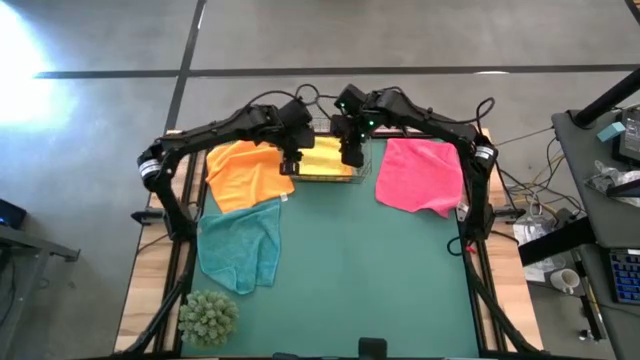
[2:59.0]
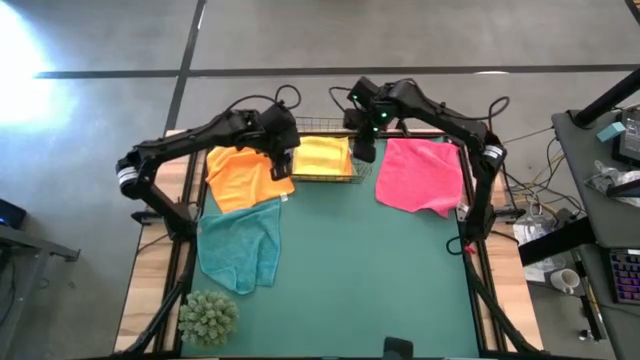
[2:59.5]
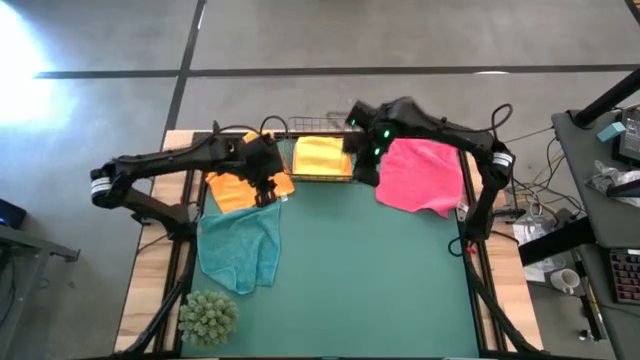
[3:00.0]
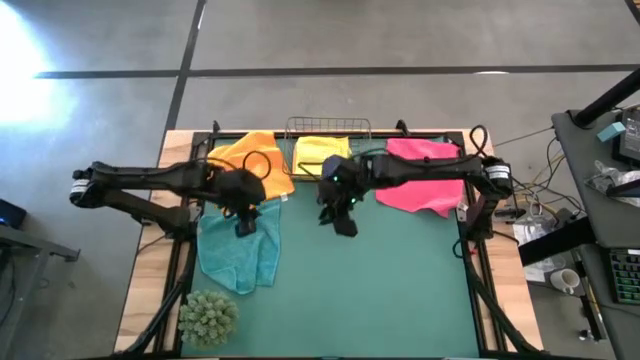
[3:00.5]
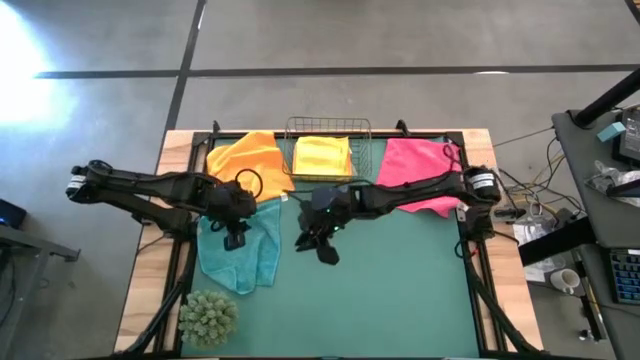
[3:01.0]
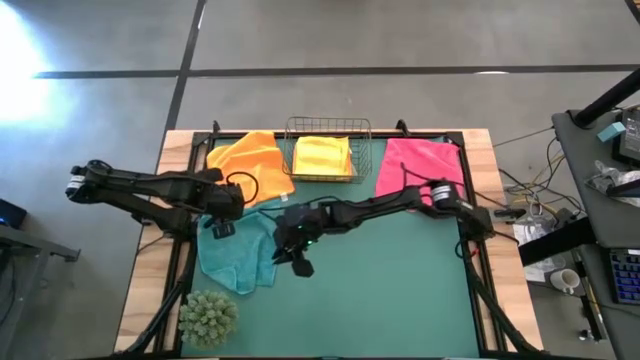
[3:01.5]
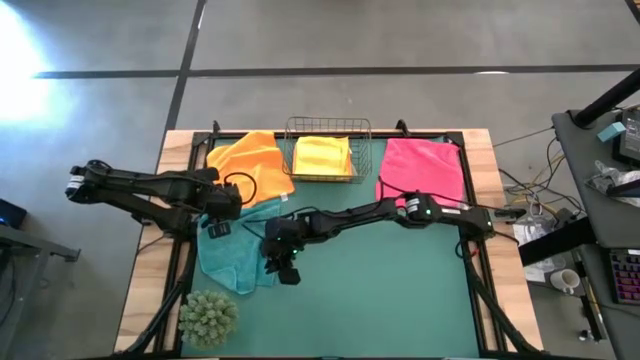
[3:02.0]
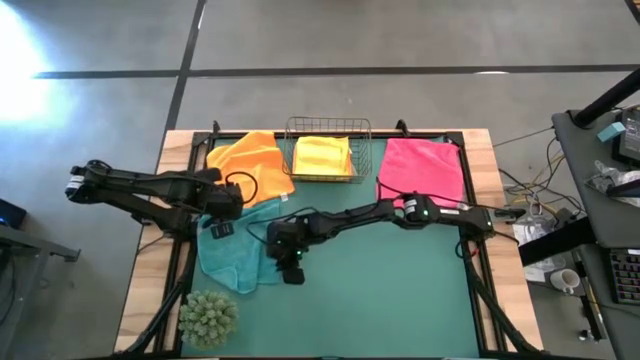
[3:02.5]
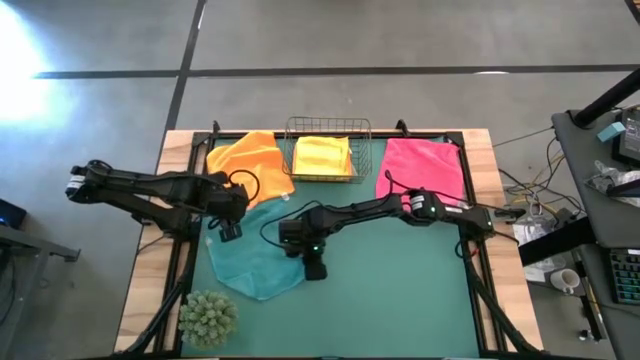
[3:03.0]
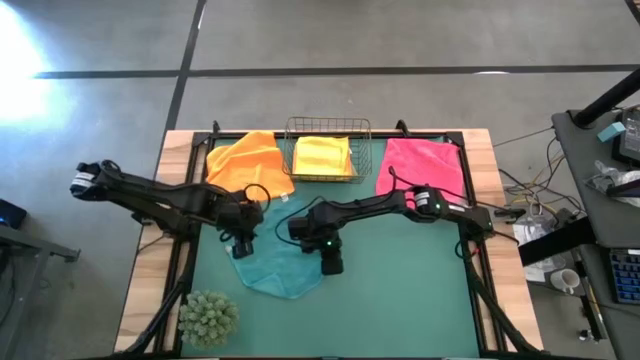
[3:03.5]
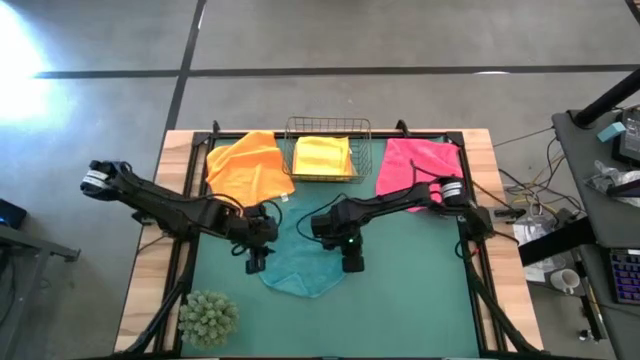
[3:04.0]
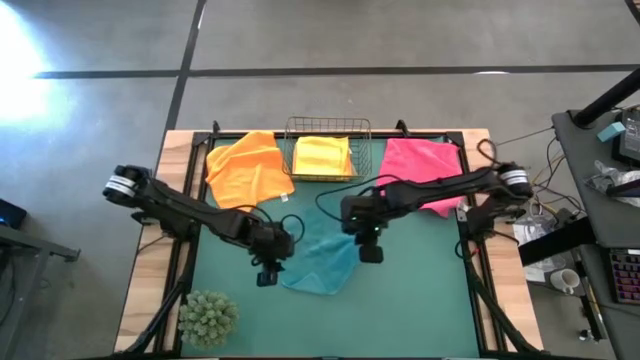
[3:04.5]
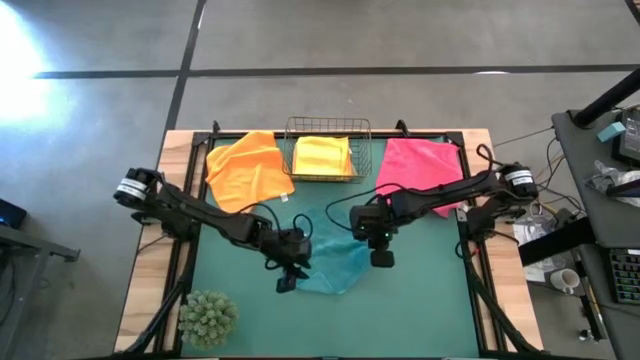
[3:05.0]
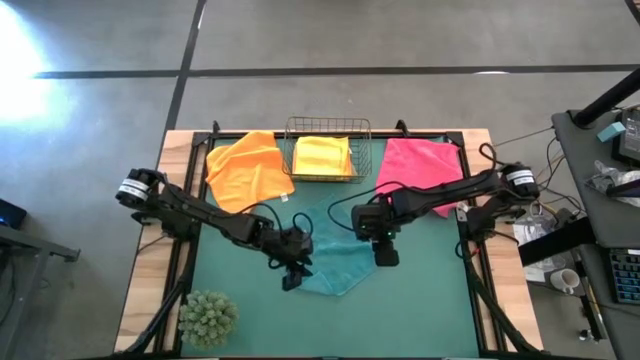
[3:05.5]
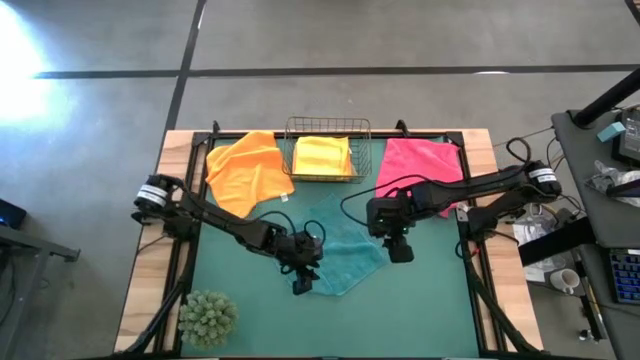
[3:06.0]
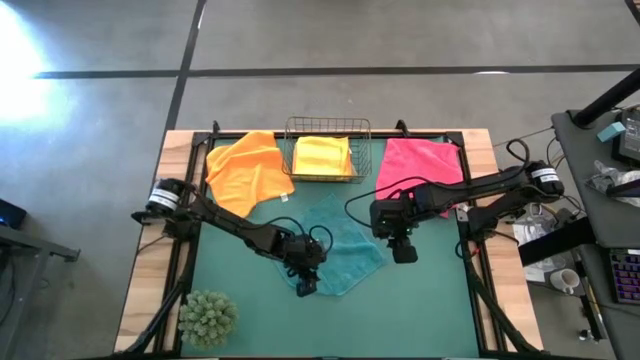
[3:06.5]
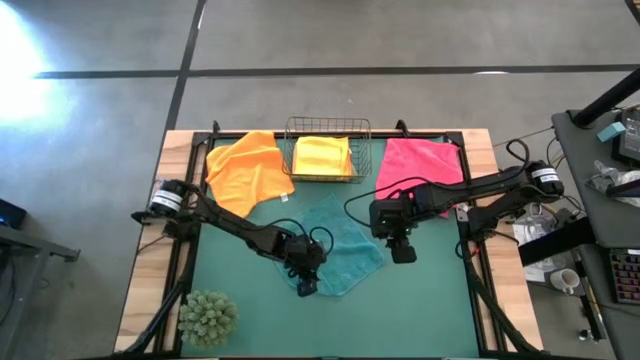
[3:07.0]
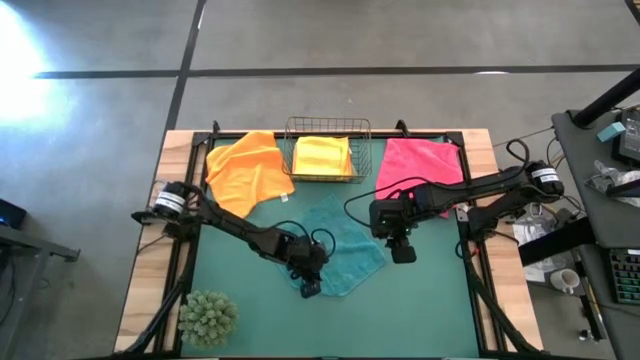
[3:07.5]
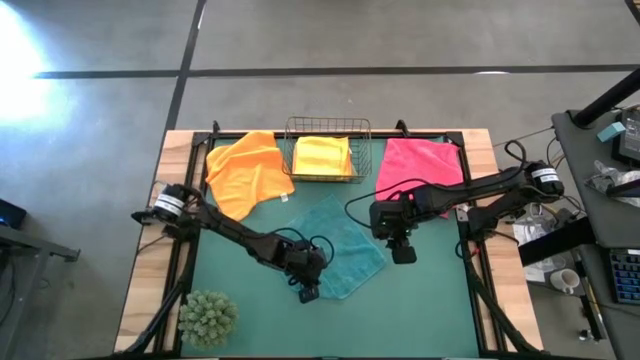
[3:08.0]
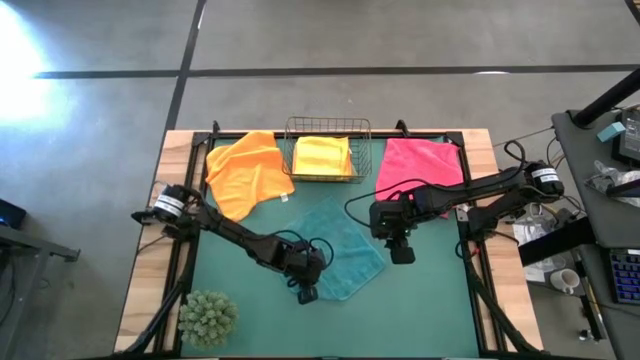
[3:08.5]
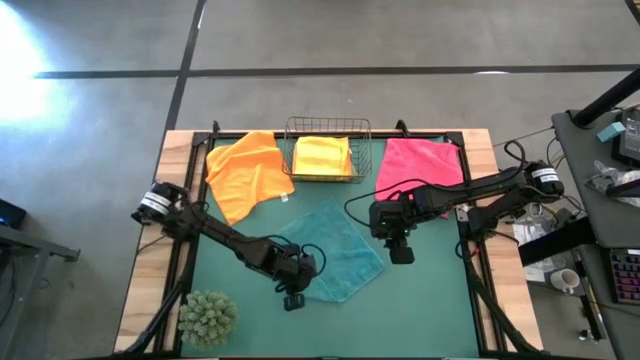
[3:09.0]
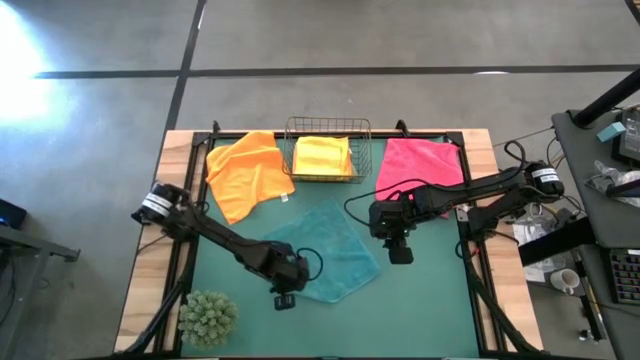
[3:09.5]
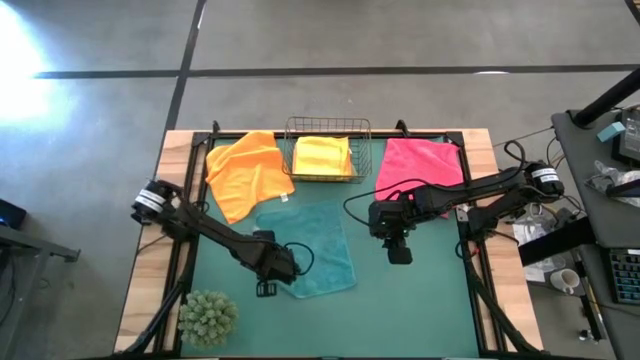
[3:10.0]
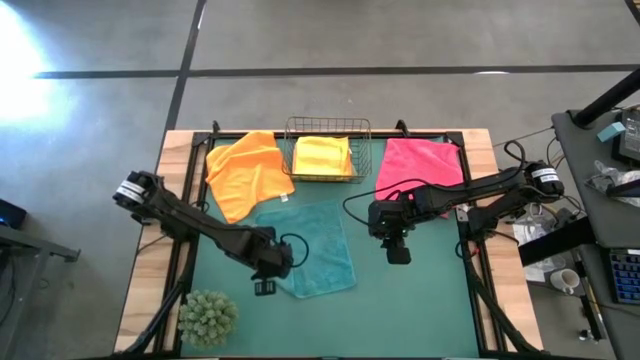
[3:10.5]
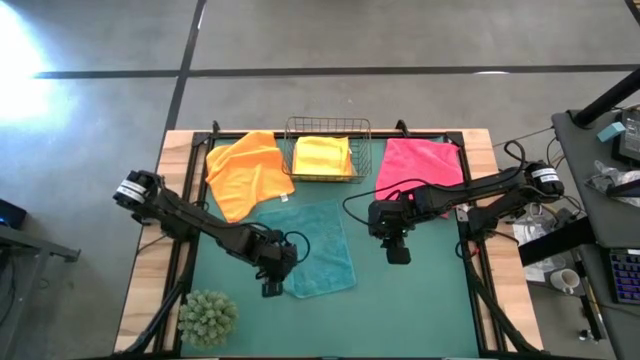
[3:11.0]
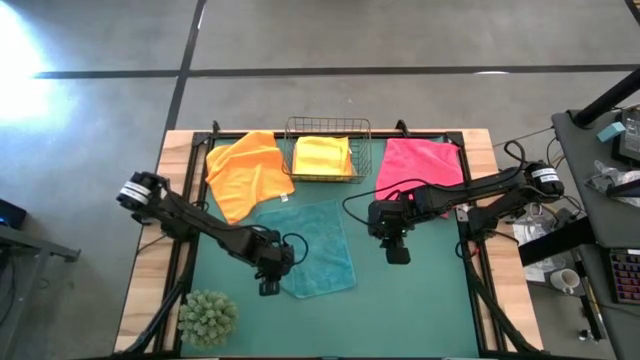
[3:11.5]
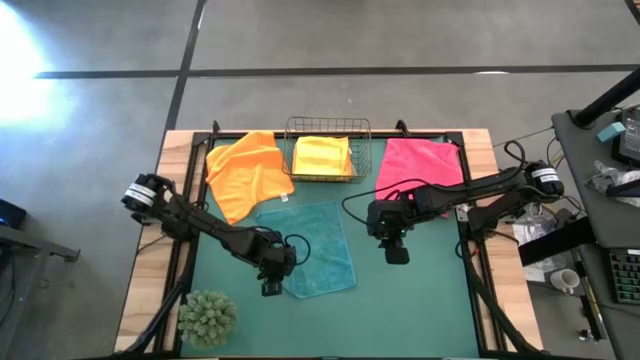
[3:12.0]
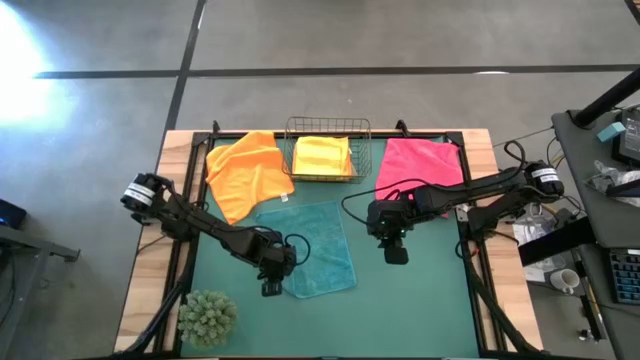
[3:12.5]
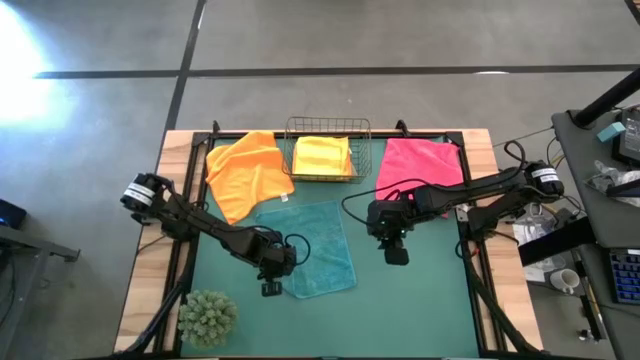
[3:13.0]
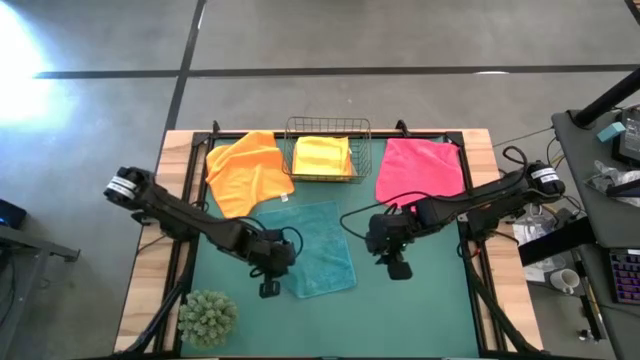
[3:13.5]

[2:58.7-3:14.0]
Task: Fold microfiber towels
Fold the green microfiber cloth
